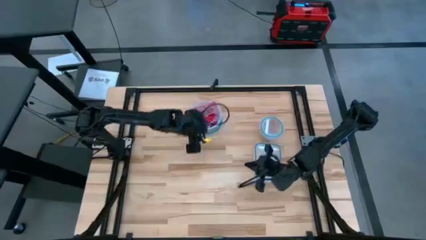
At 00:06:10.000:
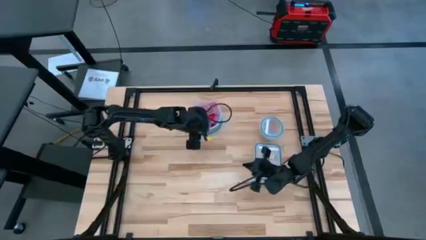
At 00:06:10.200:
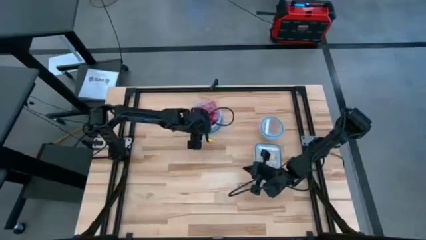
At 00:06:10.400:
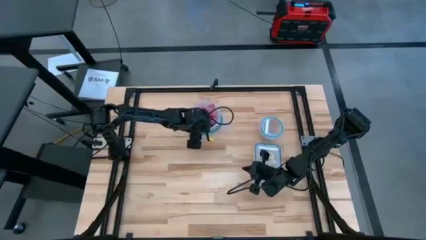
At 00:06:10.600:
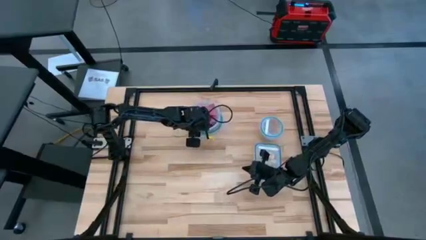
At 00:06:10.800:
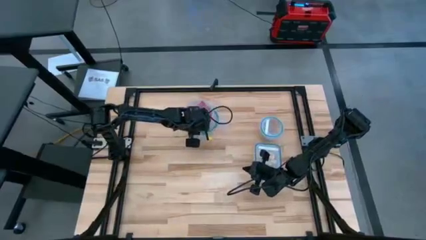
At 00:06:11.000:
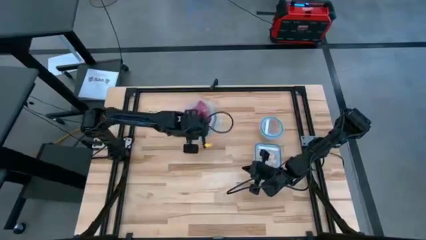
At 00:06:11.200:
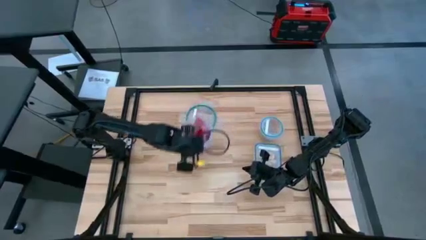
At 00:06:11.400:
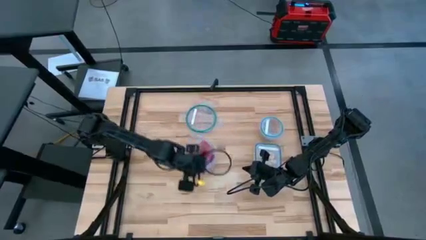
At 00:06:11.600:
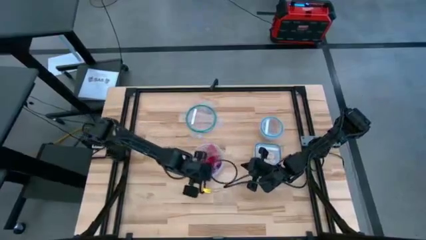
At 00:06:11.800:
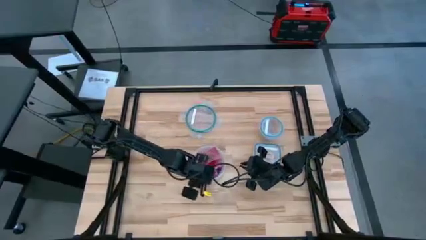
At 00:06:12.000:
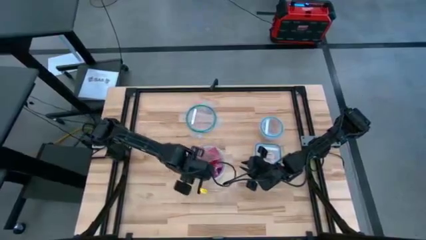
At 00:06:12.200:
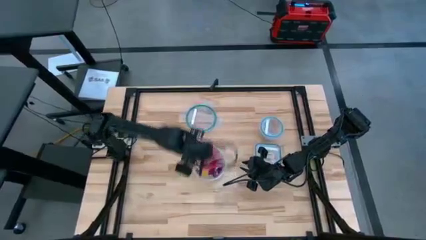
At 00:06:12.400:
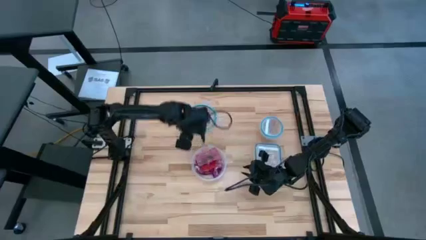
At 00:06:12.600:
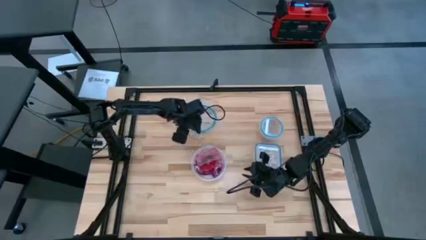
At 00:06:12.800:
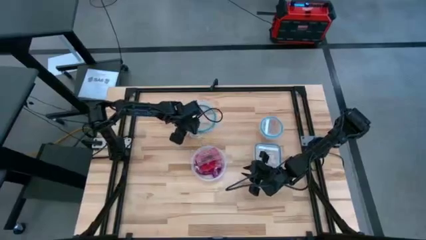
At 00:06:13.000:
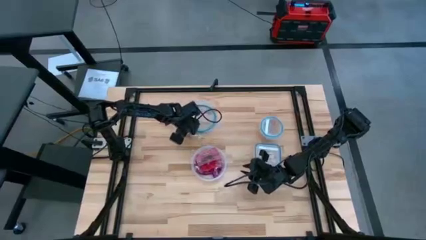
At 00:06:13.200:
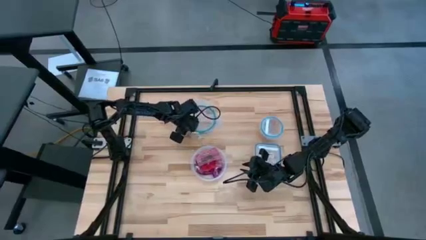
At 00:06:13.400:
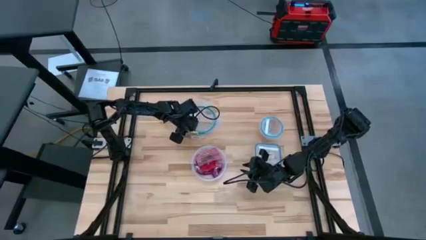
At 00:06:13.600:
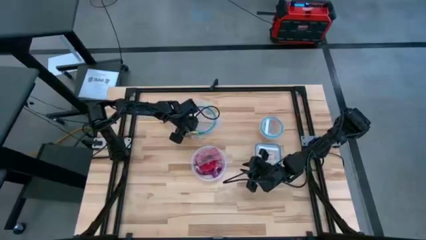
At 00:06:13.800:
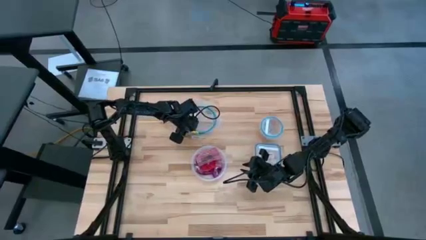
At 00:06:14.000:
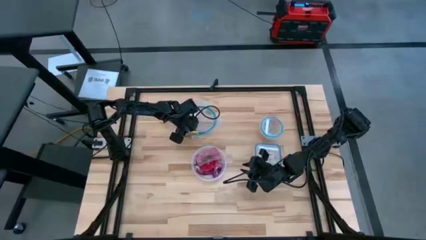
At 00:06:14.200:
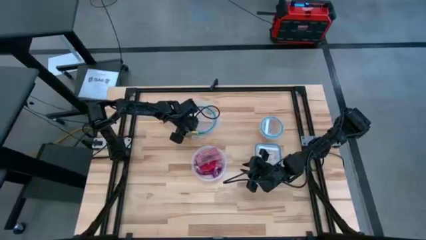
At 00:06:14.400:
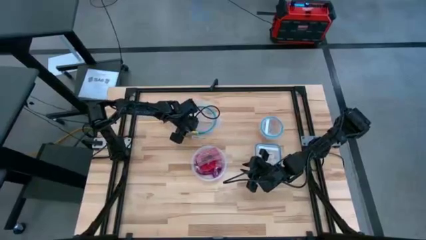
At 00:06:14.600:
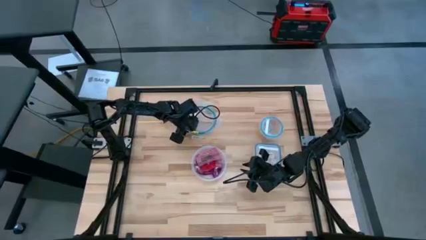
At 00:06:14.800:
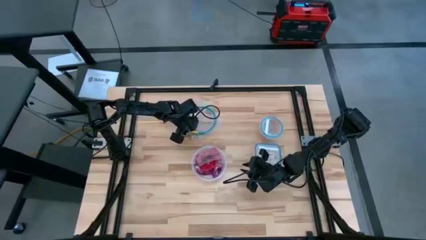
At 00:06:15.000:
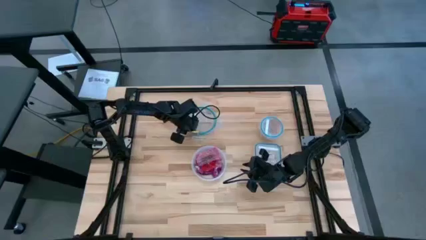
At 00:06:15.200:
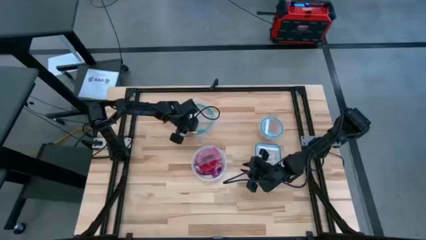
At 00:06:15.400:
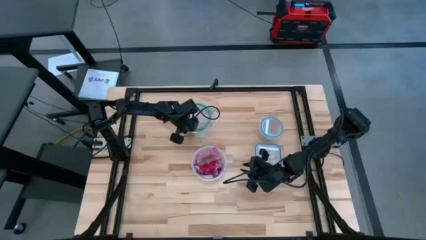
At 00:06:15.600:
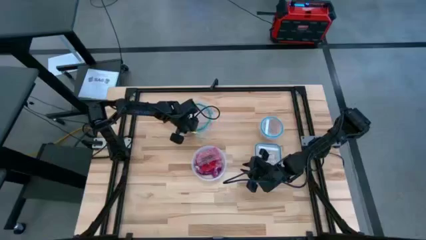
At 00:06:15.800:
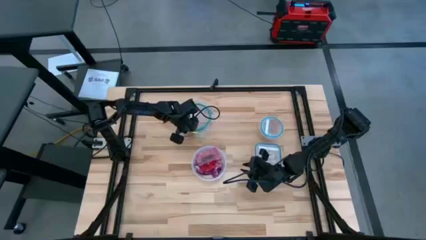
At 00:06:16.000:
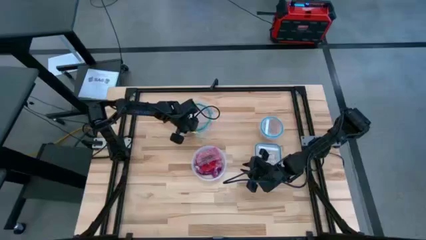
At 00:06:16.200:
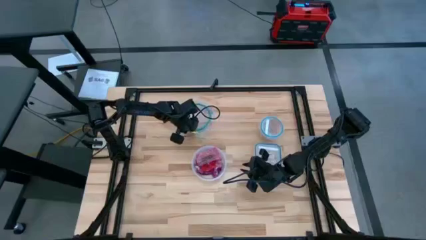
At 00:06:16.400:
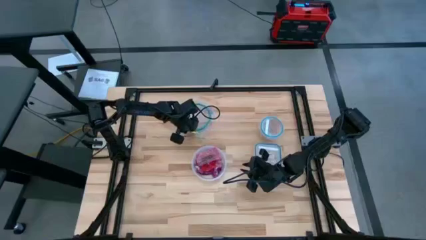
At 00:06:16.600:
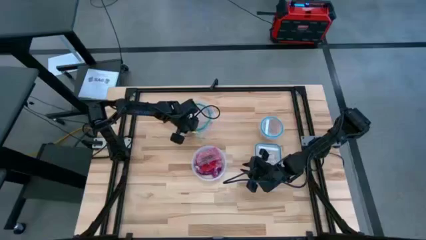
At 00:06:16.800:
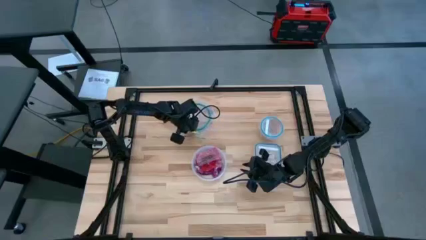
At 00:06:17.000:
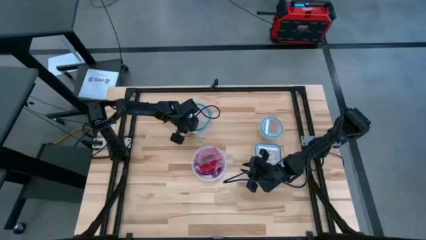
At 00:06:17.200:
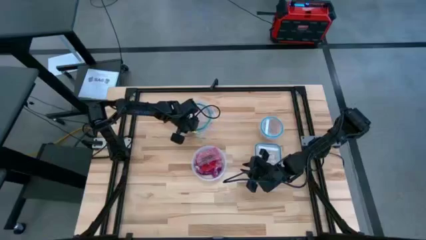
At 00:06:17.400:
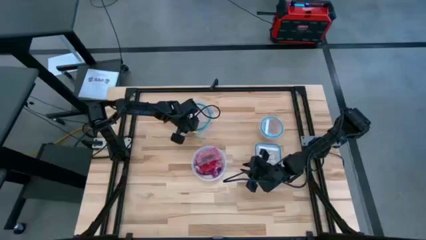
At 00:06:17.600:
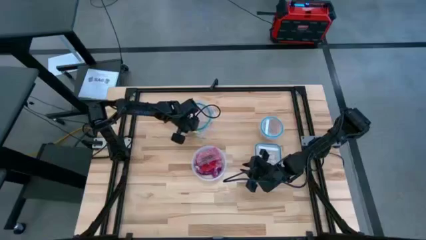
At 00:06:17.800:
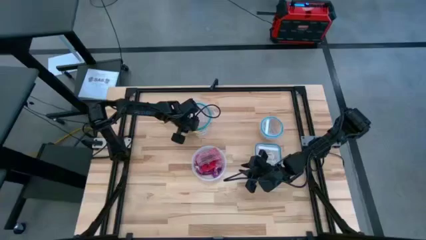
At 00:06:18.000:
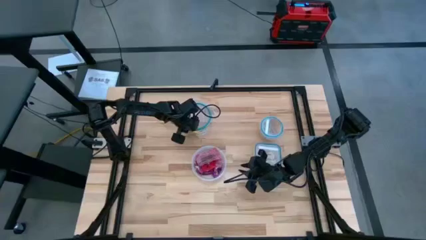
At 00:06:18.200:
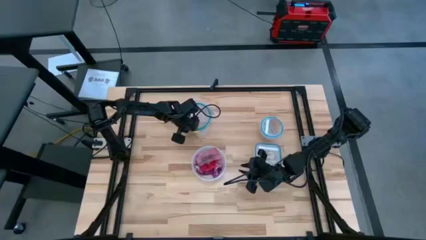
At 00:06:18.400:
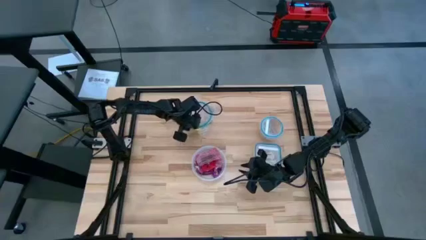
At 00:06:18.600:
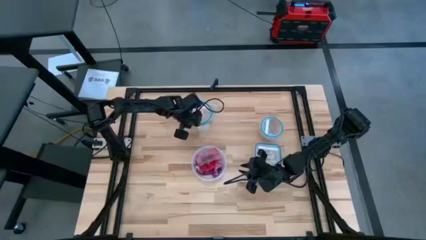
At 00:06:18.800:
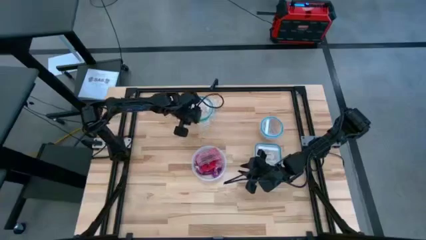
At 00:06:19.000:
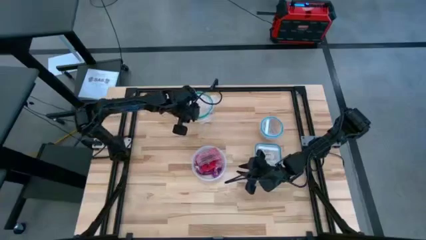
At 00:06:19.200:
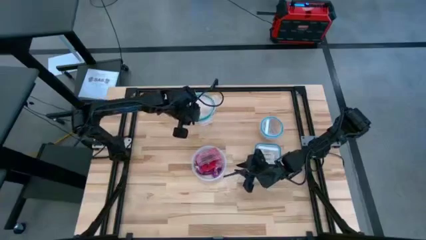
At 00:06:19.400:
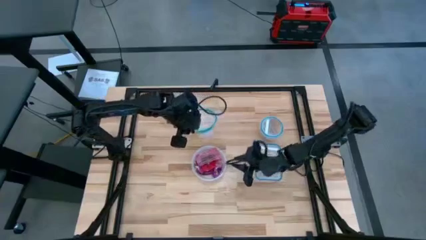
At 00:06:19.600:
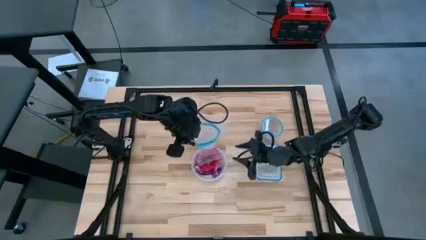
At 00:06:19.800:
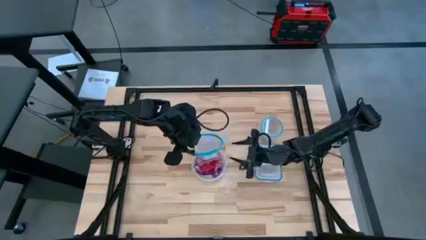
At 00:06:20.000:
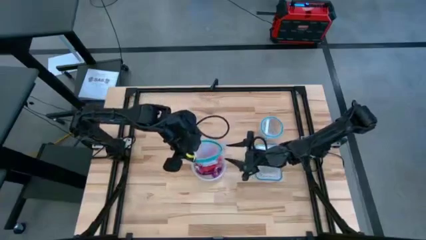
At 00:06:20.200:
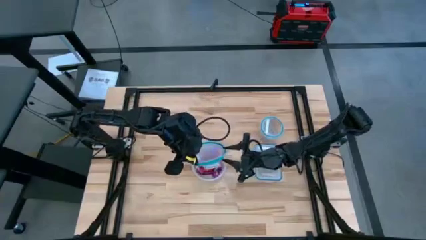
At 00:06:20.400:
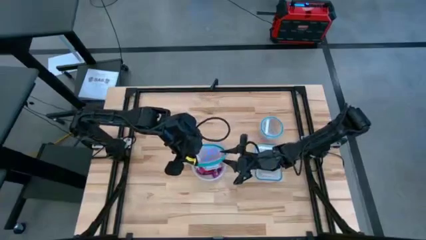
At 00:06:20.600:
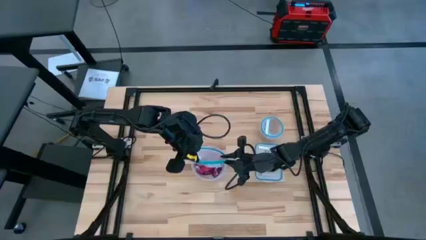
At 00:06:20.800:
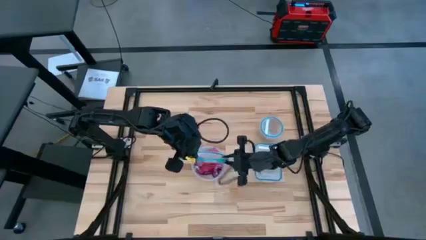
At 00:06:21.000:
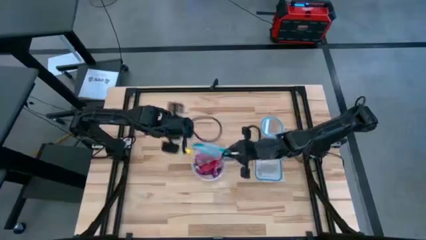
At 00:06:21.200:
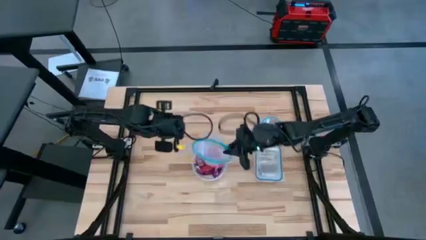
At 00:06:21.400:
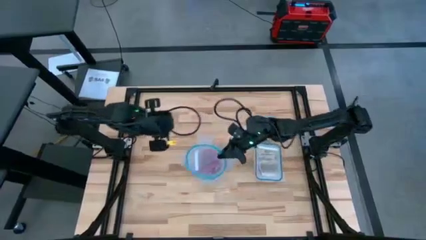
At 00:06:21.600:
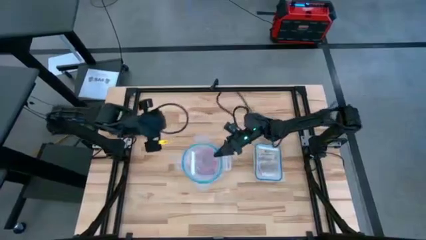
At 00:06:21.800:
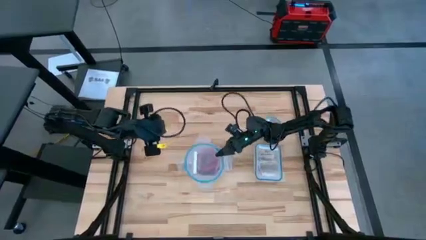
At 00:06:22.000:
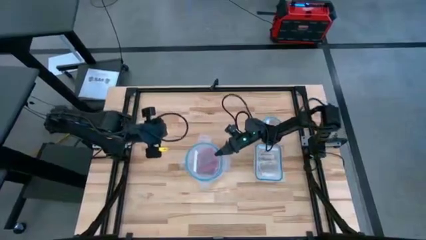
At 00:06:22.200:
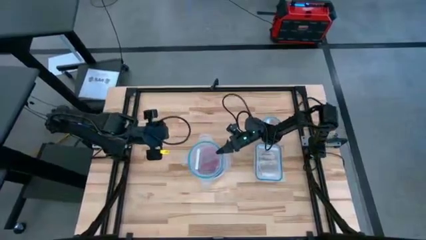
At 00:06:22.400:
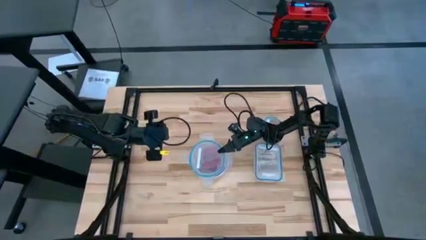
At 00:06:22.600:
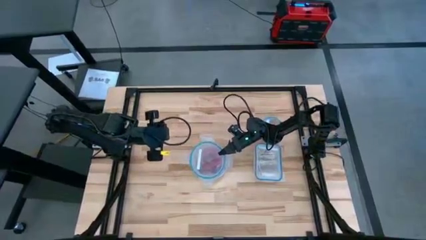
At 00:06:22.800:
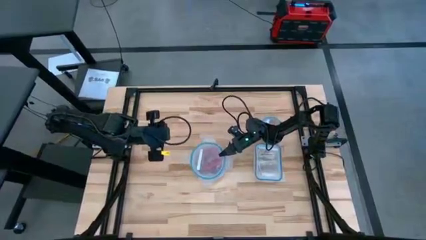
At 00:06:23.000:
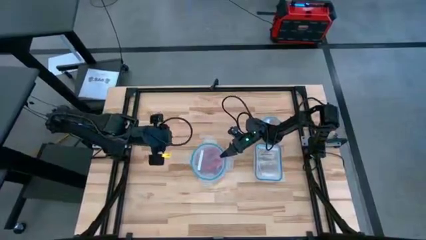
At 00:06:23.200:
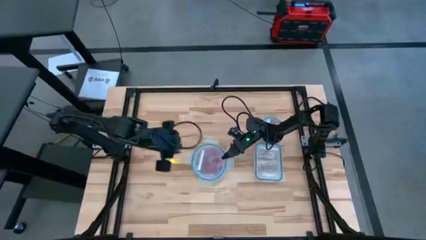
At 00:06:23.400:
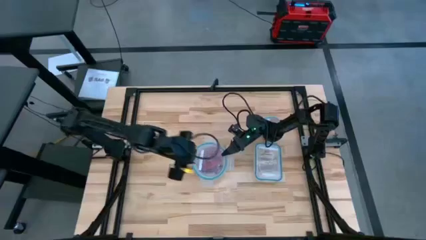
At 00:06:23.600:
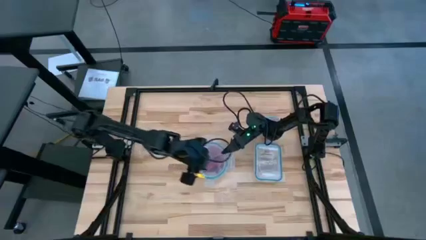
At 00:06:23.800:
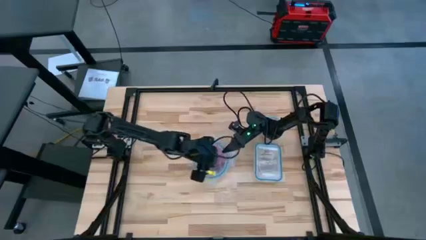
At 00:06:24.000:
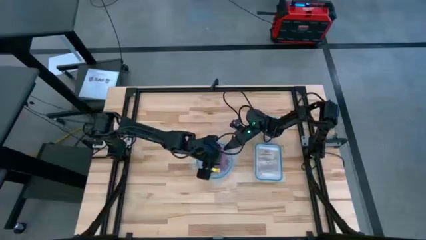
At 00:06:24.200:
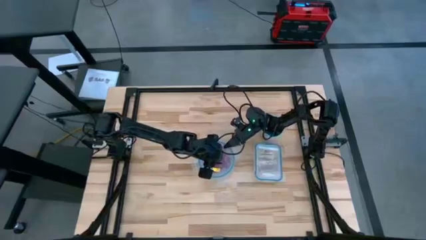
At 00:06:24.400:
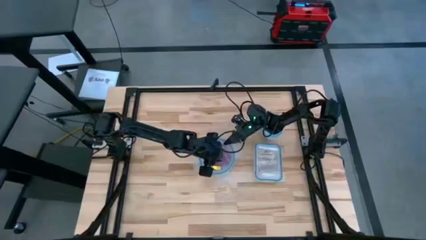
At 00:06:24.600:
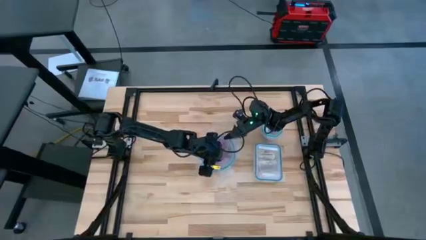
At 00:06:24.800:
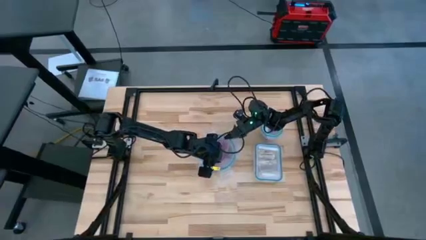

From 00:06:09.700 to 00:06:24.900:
Task: Sort candy
Close the big circular transparent bin
